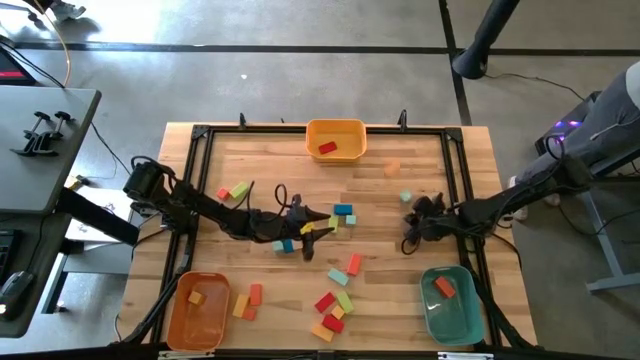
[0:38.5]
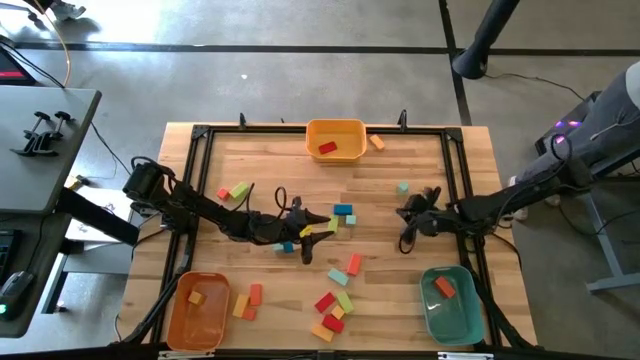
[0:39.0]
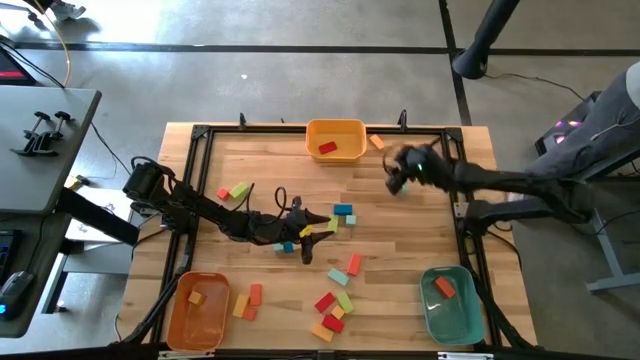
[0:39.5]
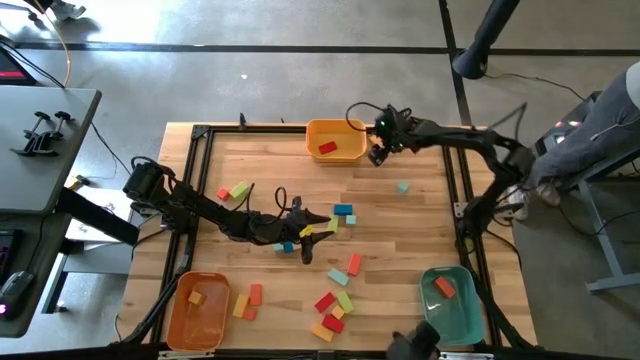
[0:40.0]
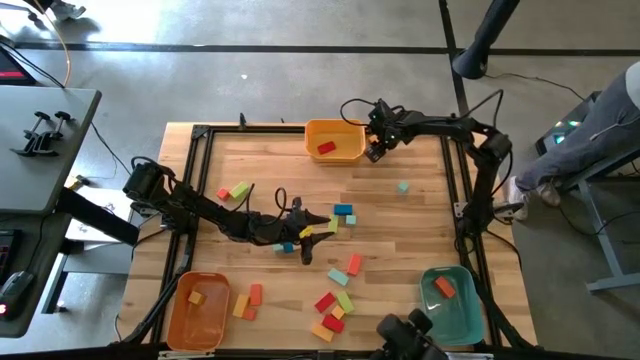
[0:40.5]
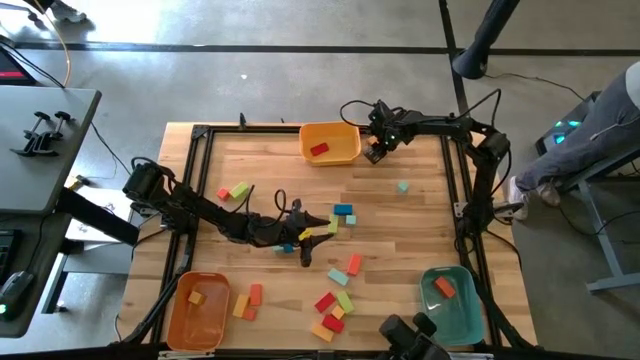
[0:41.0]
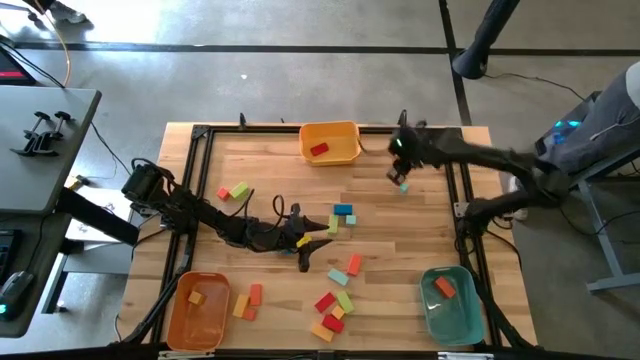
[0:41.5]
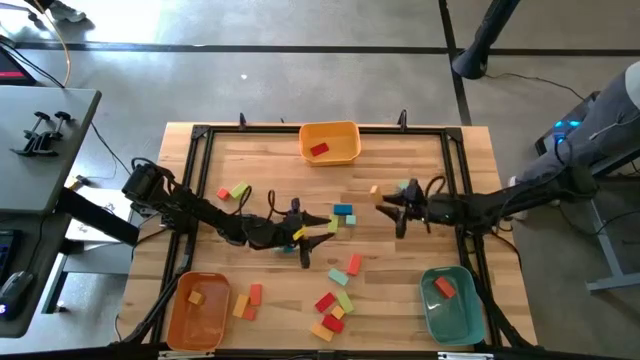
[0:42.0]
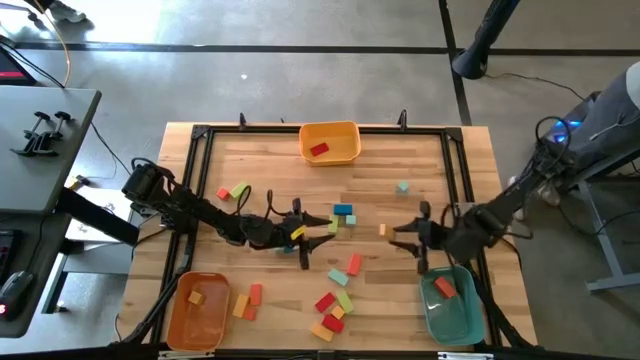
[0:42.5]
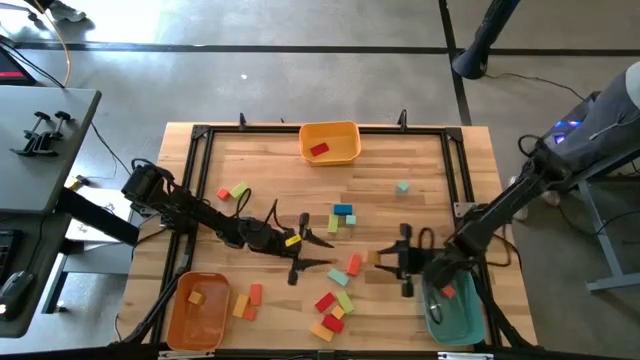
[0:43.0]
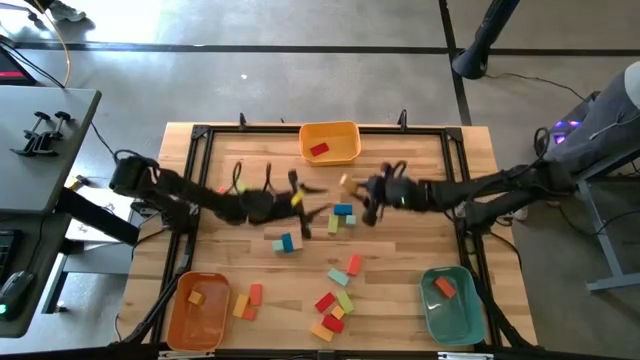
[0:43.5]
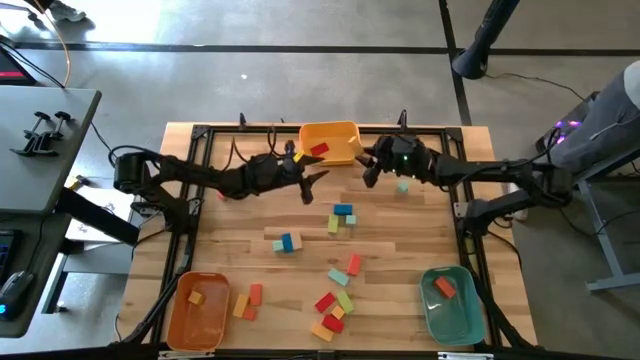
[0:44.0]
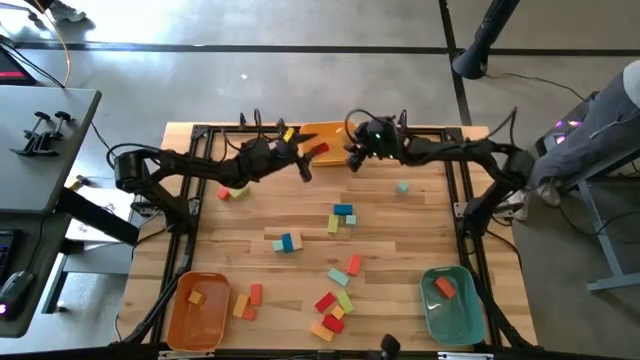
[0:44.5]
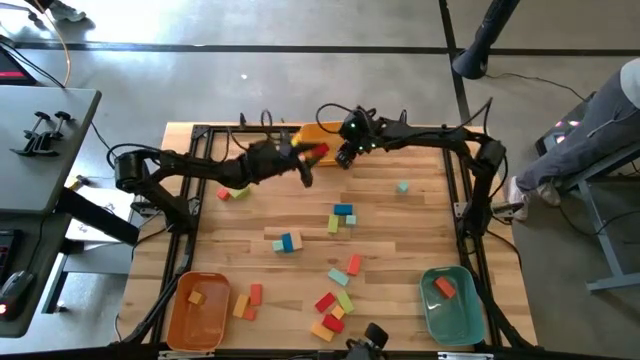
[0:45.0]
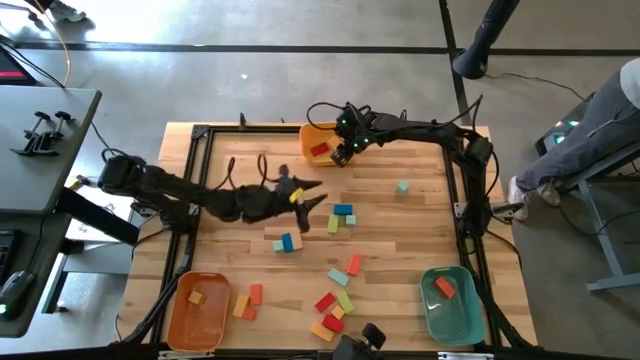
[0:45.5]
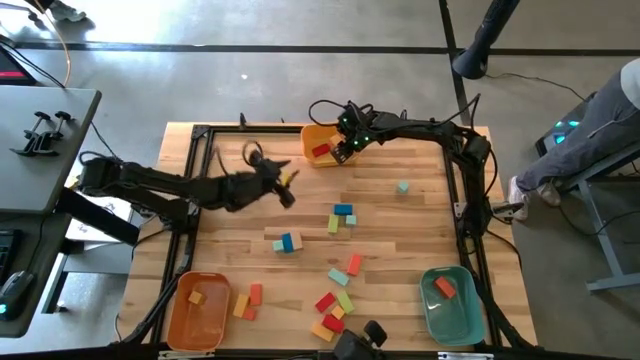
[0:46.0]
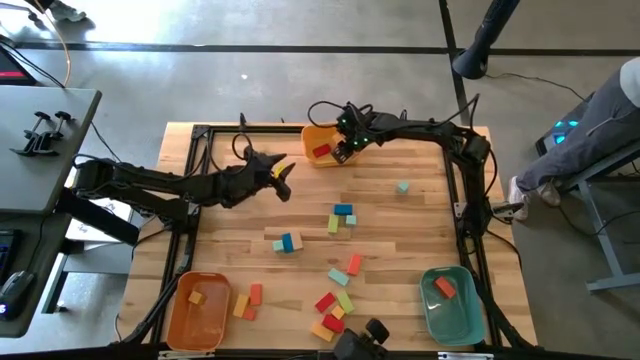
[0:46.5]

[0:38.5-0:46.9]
Task: Sort blocks by size
Put the small yellow rectangle block into the yellow bin

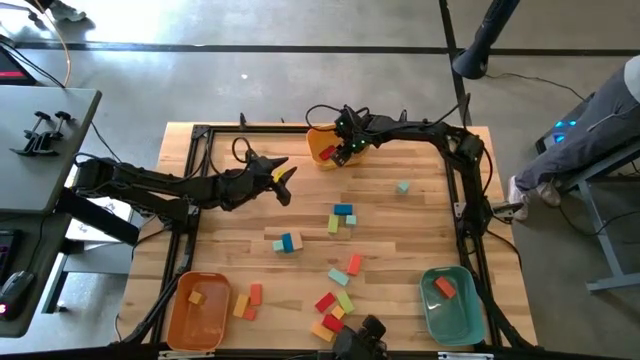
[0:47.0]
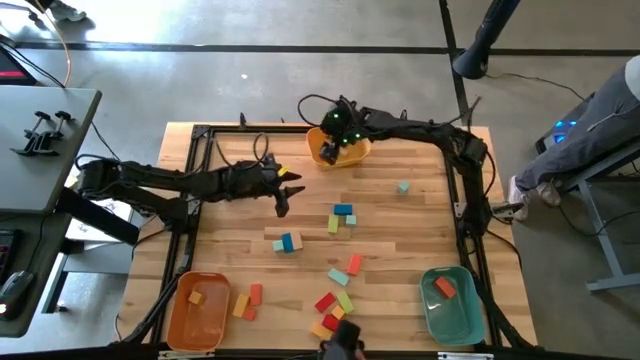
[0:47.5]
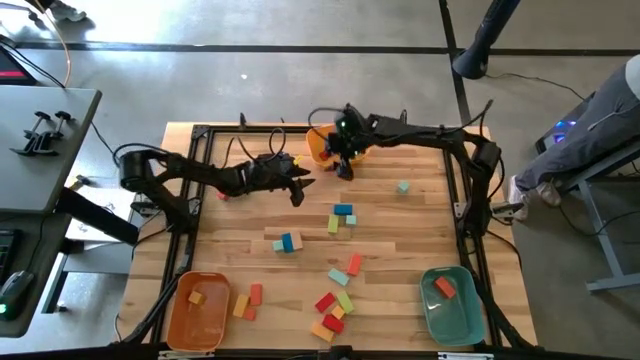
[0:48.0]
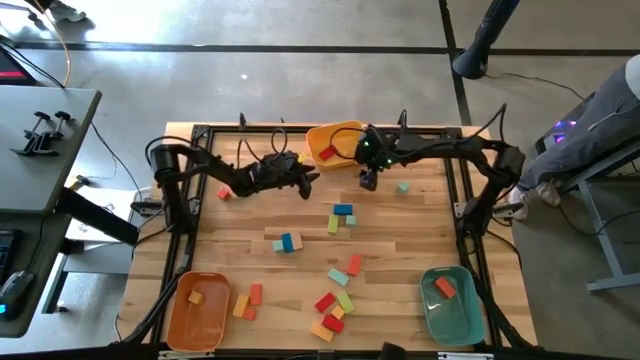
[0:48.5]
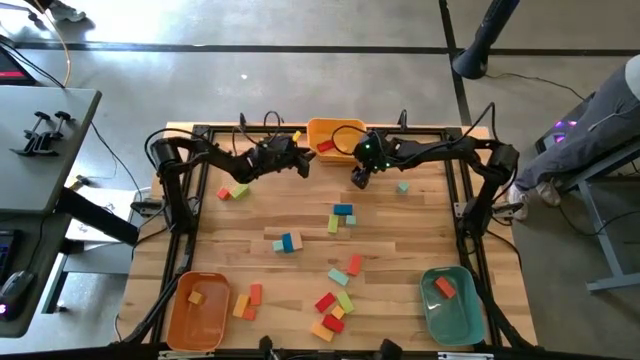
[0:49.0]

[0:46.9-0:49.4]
Adjust the yellow bin

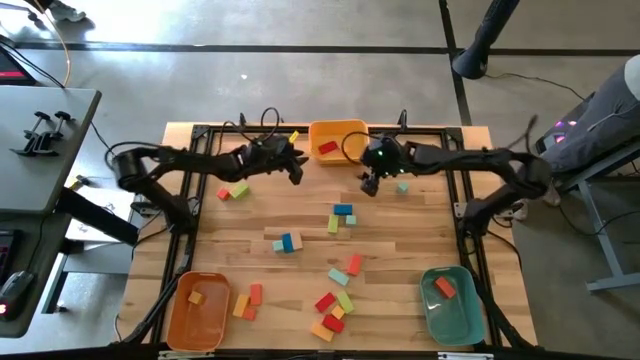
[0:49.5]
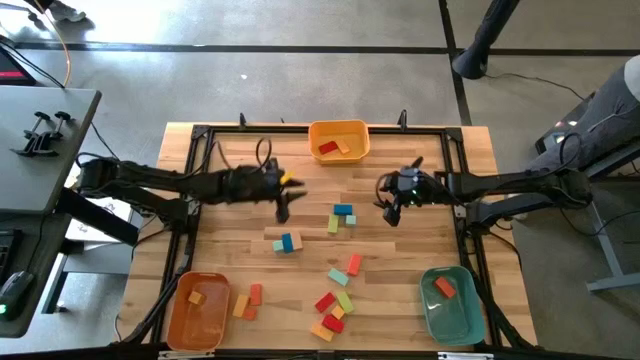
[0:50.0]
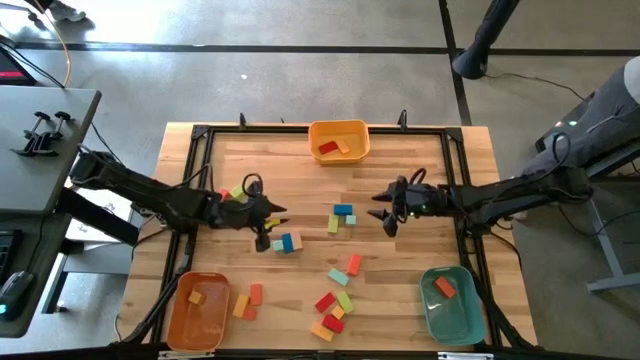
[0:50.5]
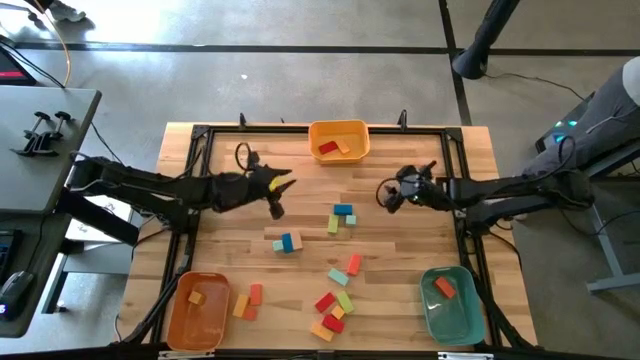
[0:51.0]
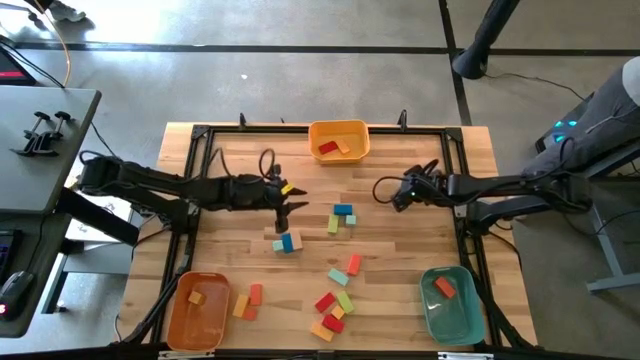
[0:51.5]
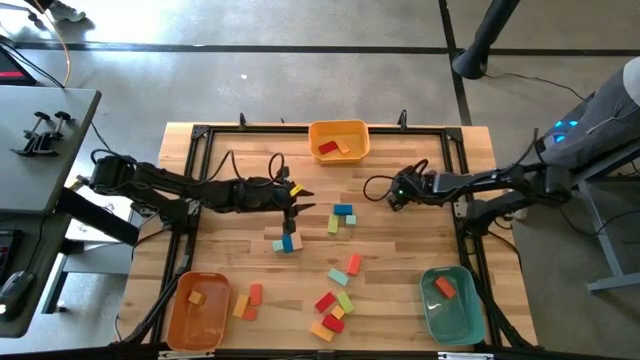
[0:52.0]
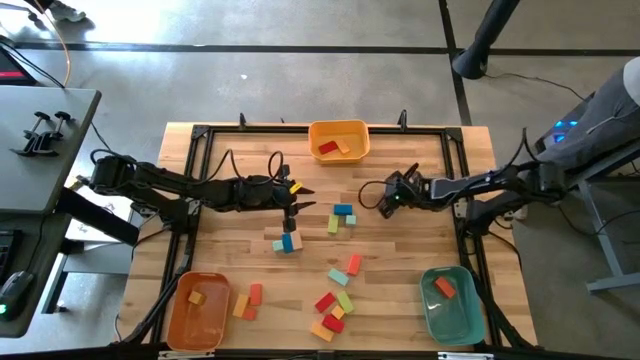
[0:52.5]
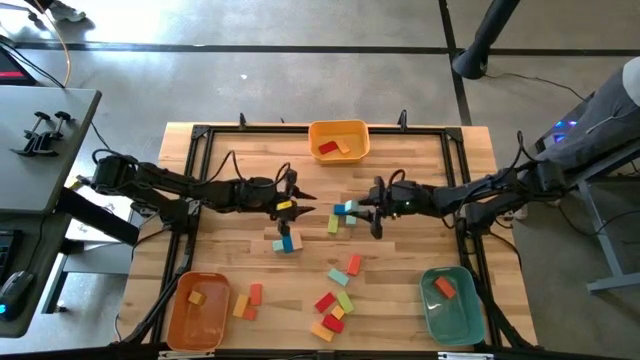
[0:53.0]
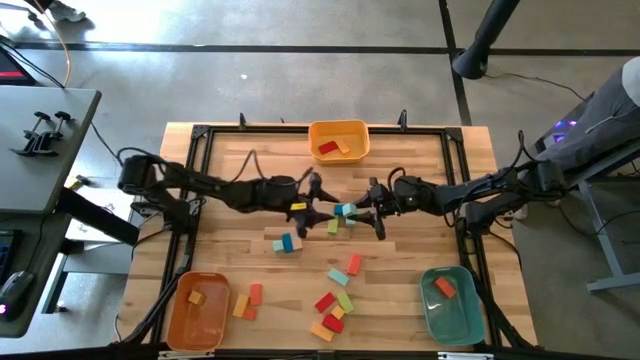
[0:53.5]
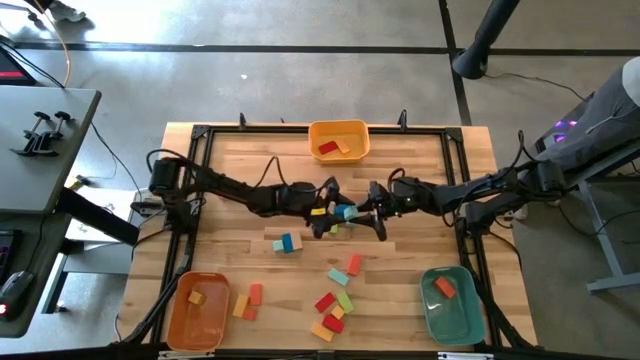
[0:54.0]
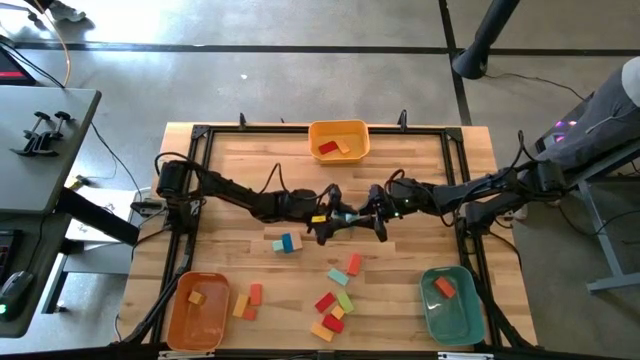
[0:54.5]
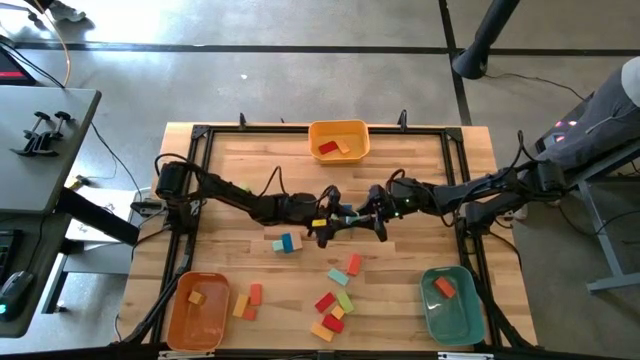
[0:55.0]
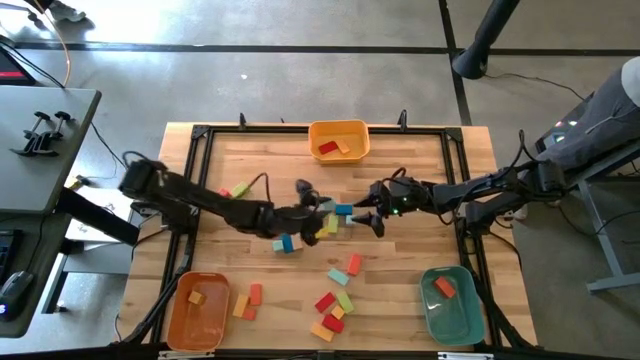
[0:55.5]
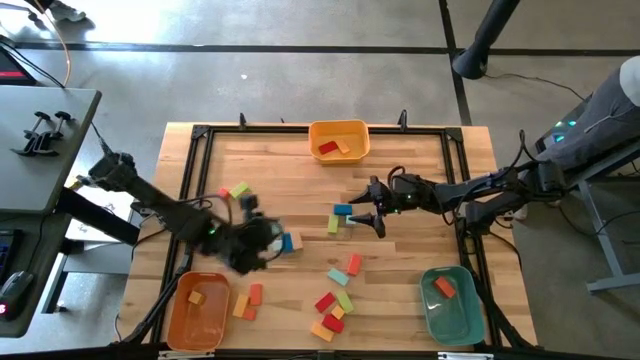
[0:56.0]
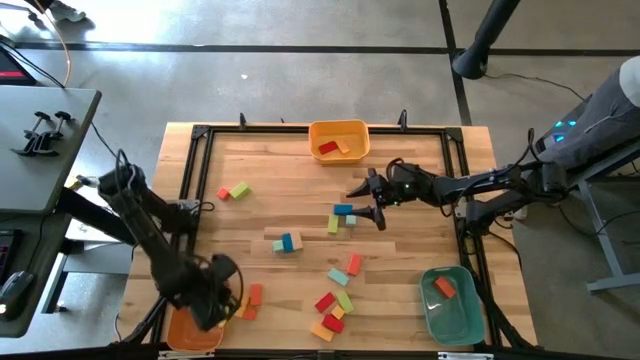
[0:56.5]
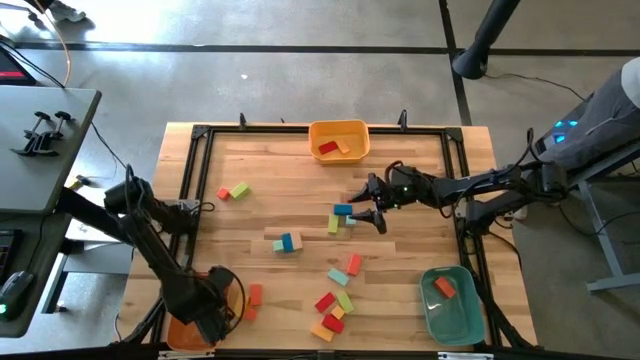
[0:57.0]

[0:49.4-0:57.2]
Put the light blue square block into the orange bin

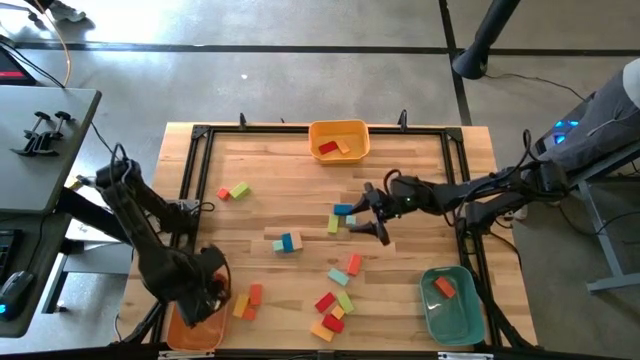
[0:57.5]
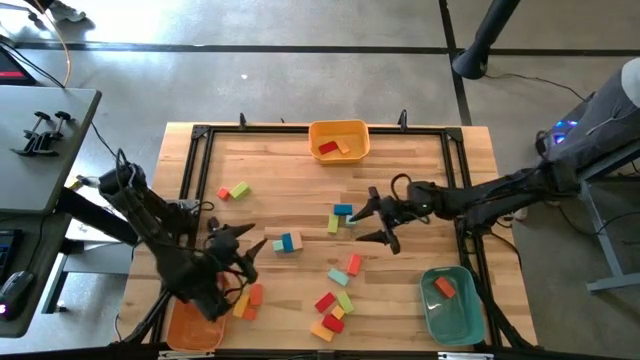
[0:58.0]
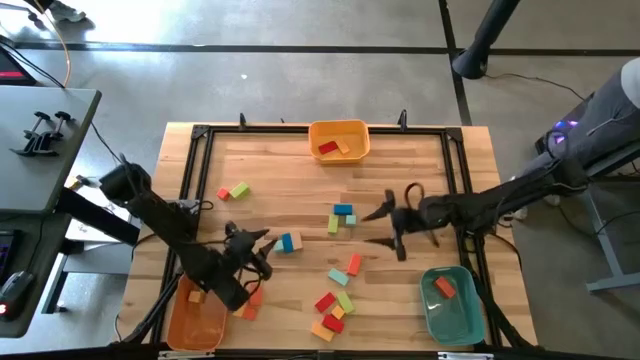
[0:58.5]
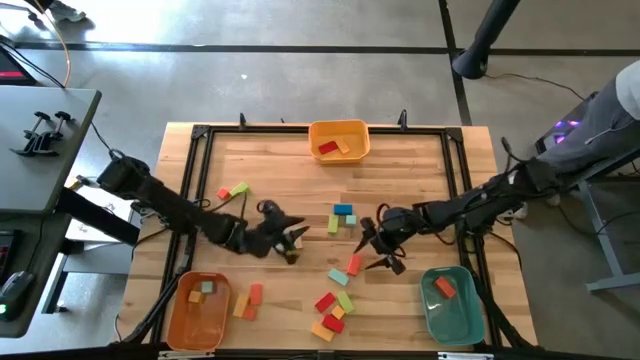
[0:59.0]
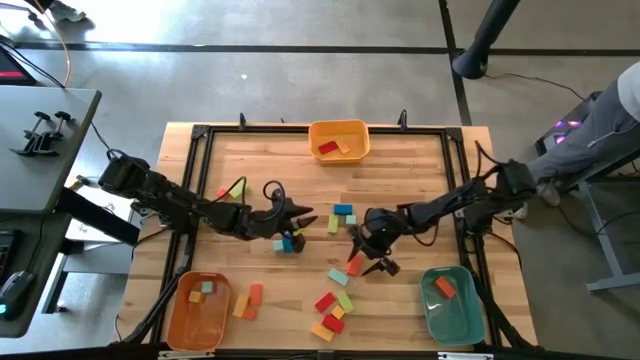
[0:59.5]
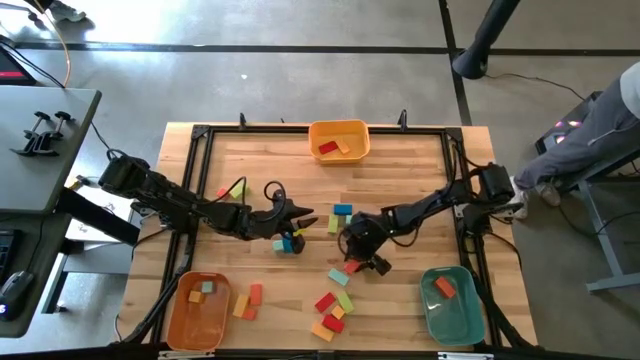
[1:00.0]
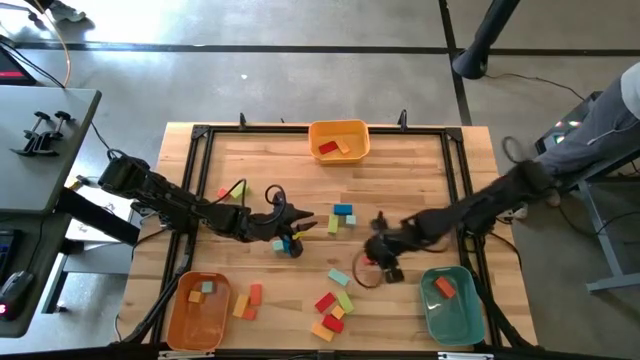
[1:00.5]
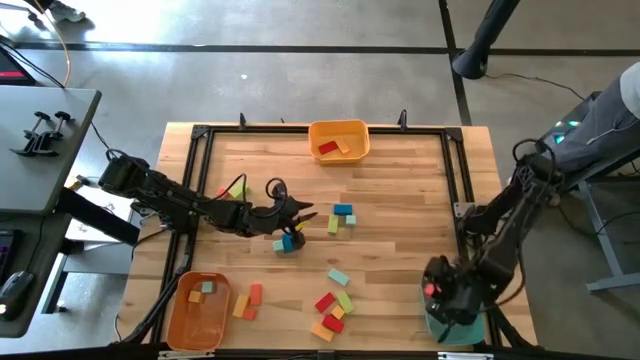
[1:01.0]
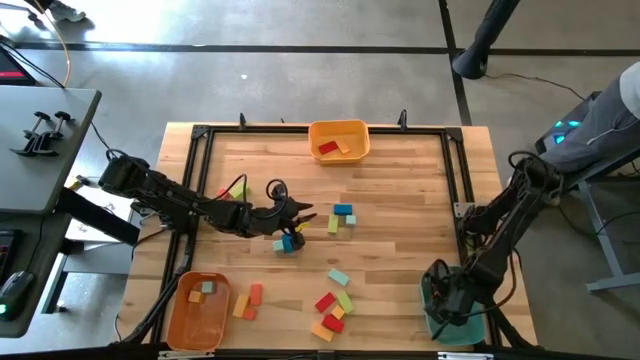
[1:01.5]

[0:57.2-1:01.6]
Put the large orange rectangle block into the green bin
